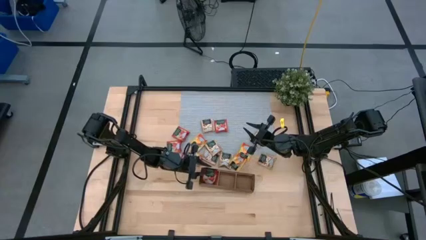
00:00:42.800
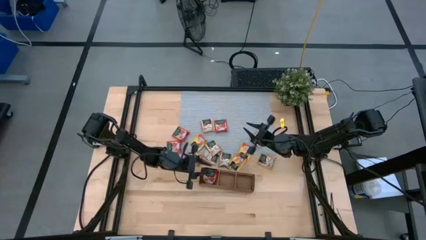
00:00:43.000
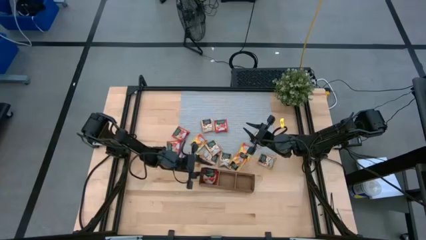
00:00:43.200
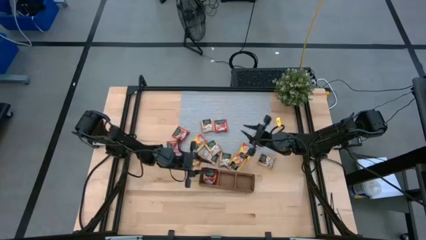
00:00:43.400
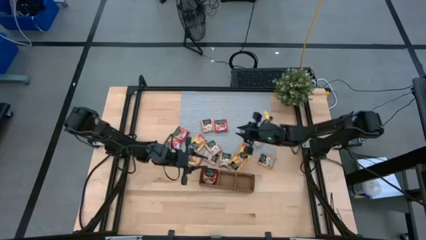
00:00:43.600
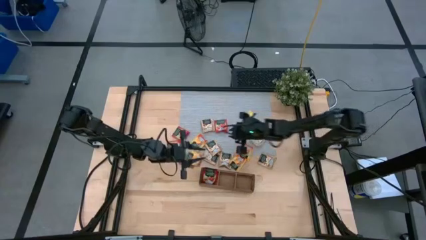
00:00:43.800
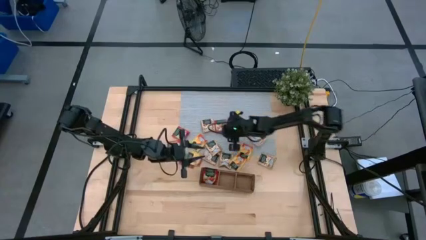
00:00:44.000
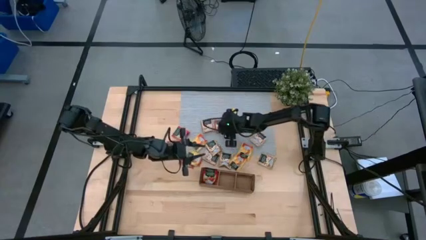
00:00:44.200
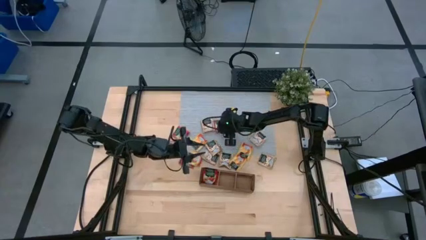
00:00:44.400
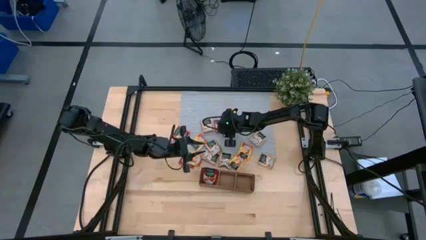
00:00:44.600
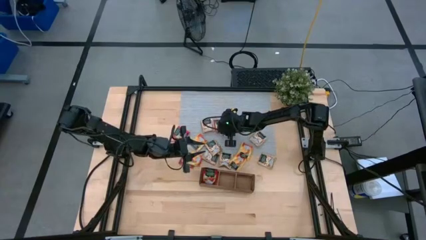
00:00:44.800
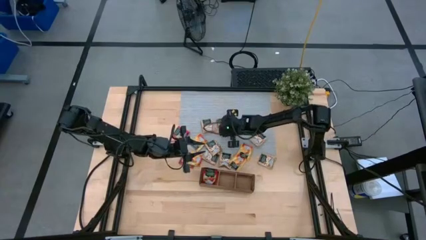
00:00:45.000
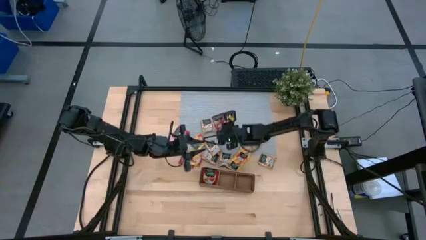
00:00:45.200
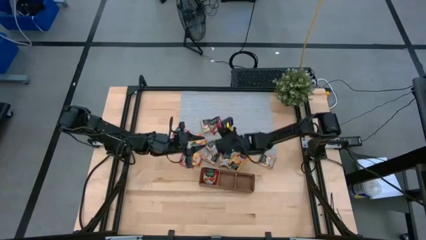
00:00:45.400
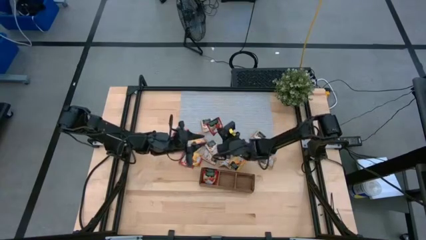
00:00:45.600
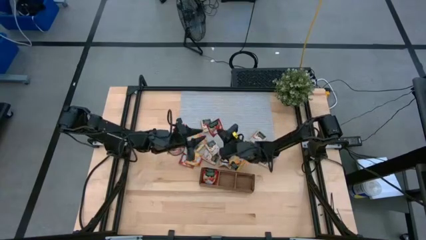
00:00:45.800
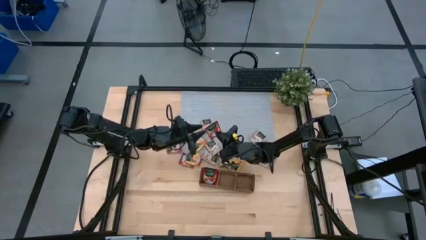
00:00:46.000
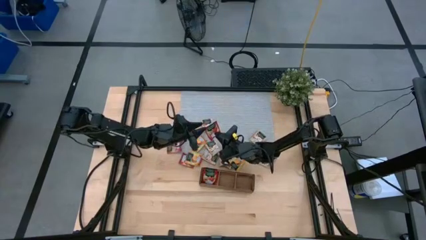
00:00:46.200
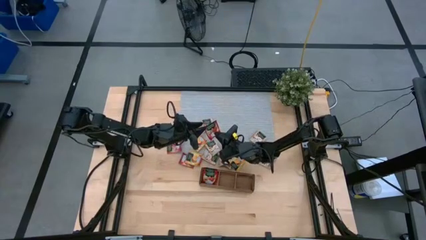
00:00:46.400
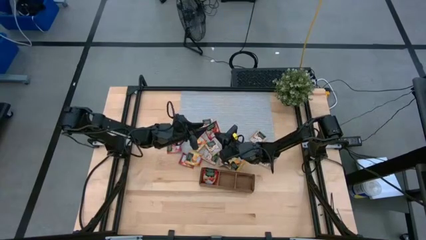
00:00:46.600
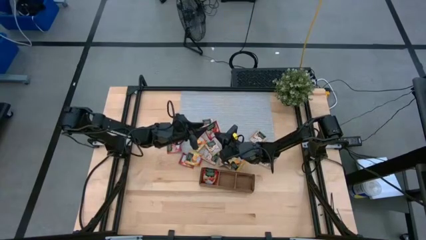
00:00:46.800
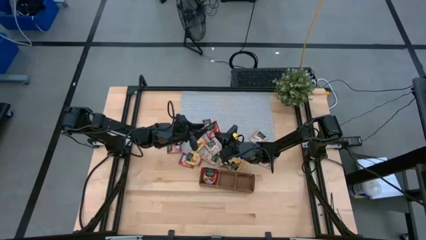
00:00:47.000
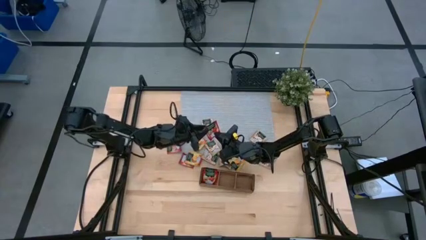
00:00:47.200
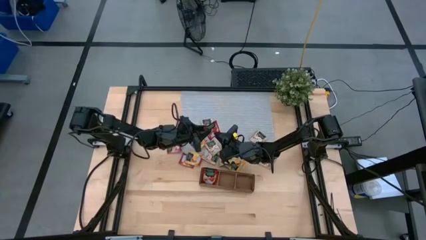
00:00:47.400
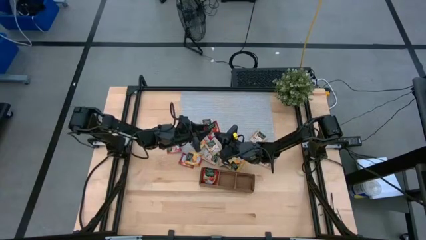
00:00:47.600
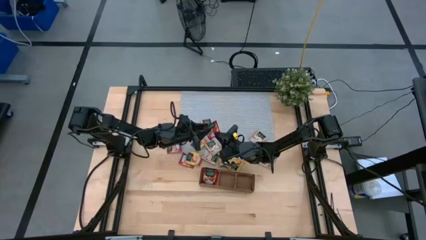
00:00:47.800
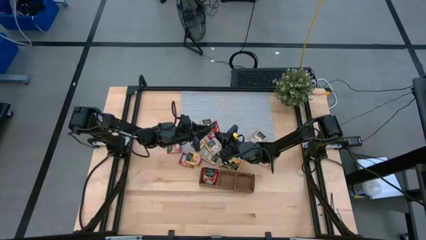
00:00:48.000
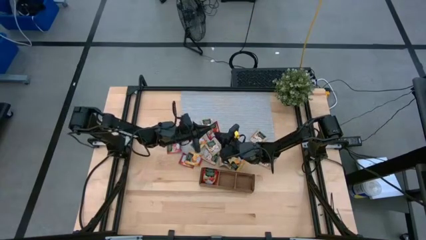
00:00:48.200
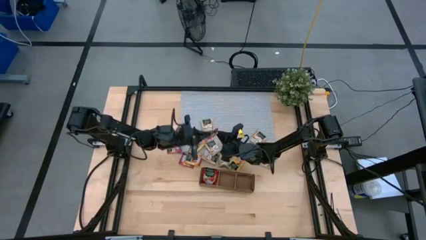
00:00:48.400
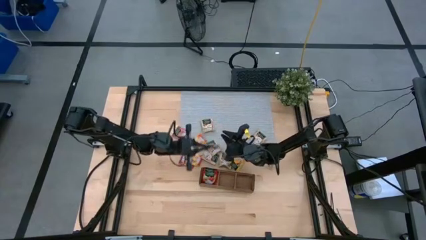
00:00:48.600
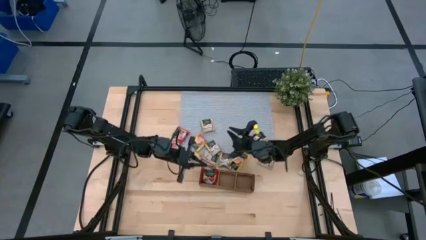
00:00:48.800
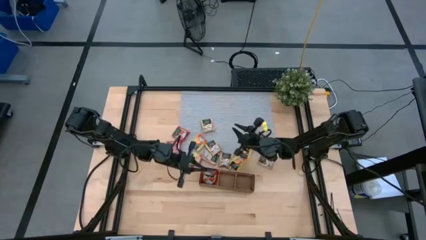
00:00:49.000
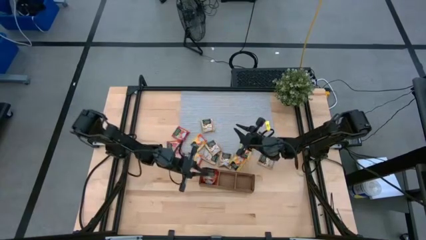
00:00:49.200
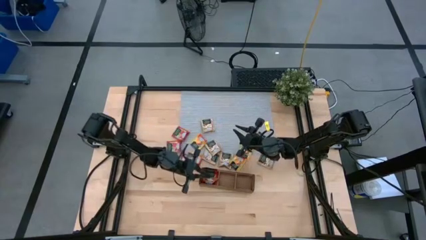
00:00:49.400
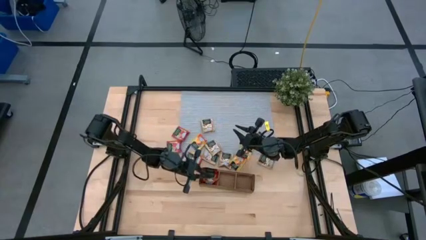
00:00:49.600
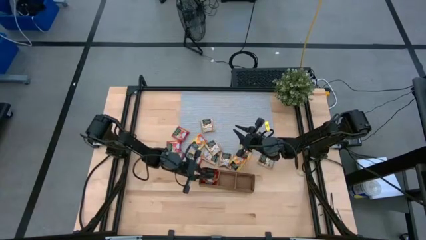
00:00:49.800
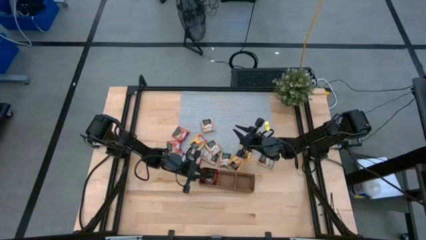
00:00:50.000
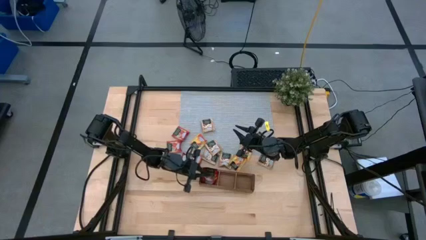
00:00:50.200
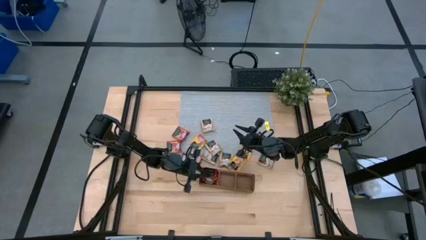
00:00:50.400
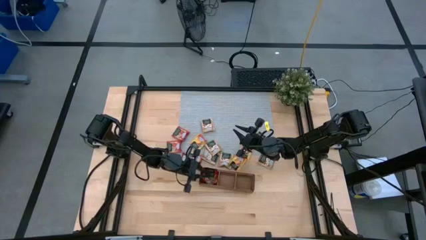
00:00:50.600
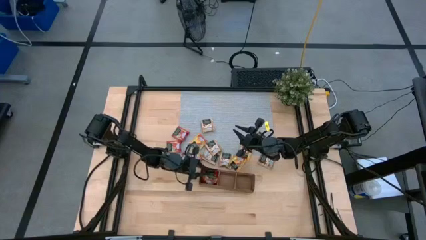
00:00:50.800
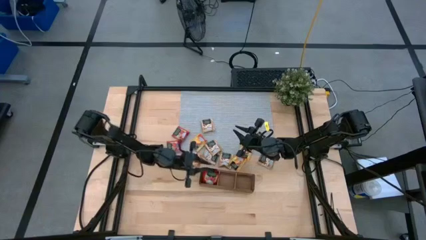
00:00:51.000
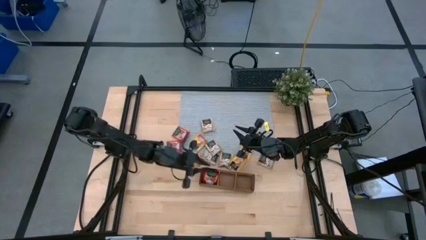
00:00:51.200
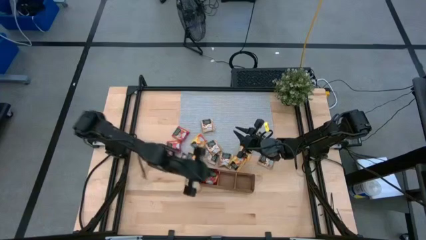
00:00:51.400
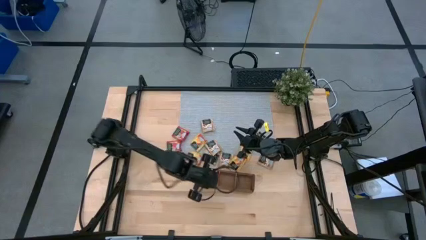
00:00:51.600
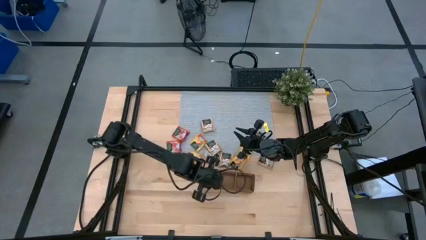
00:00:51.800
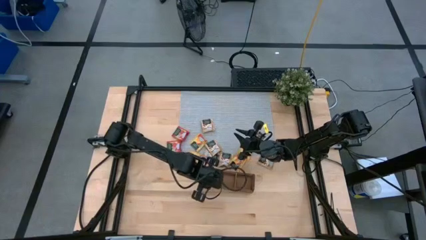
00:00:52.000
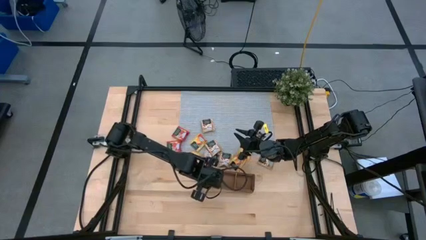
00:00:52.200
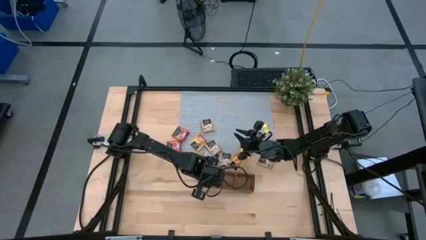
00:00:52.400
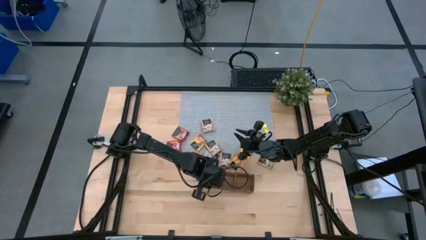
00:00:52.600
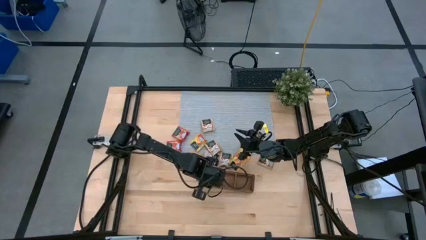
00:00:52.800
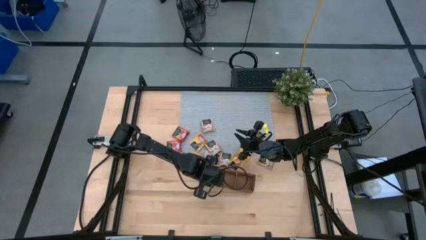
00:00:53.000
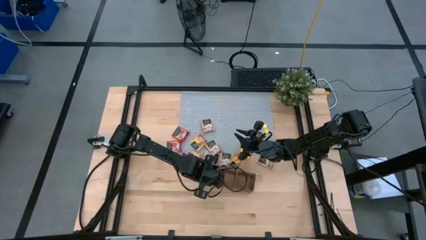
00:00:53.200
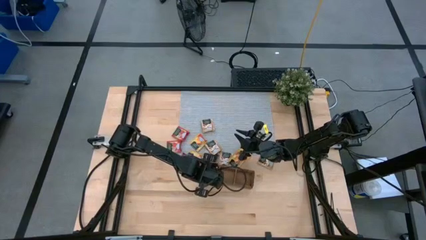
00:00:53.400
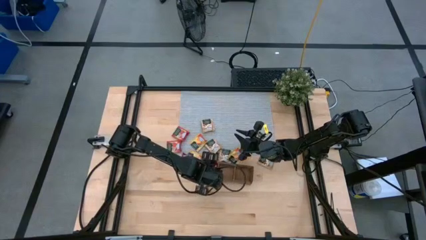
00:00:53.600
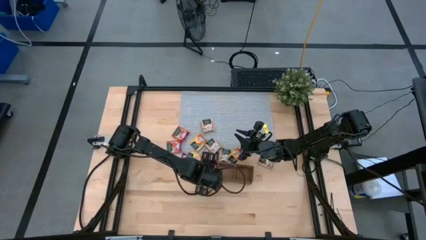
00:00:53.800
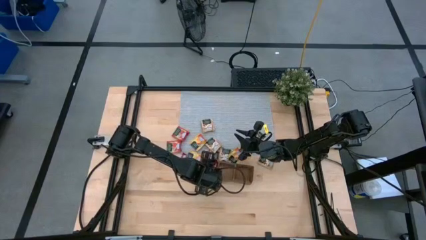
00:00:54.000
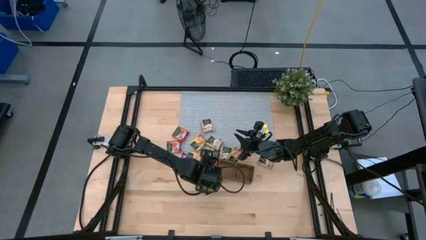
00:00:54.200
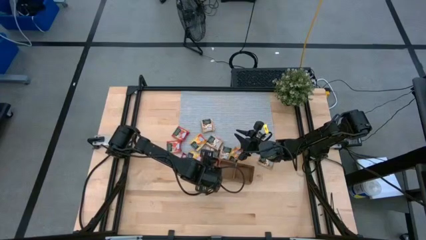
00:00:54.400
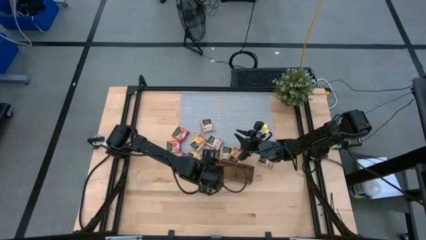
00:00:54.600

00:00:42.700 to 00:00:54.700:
Task: Pick & Place Tea
Put the red tea bag into the left section of the wooden organizer
